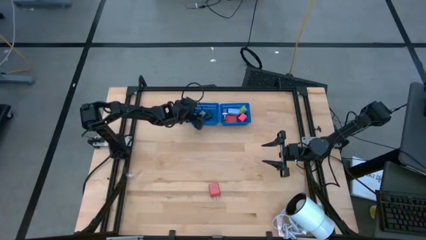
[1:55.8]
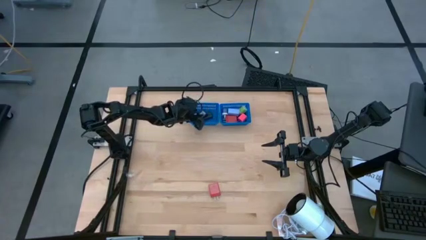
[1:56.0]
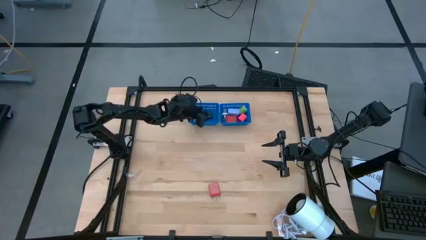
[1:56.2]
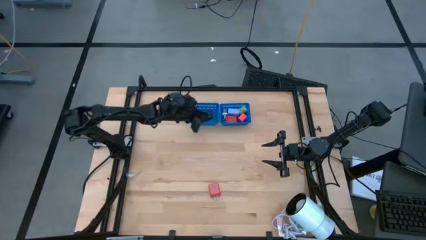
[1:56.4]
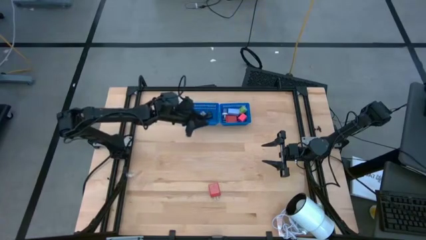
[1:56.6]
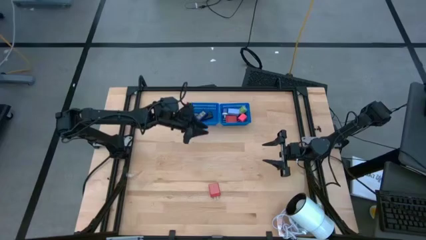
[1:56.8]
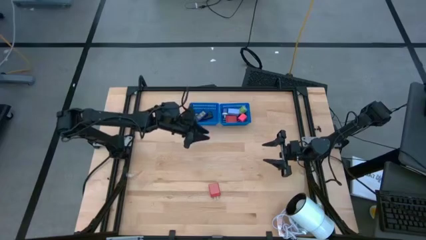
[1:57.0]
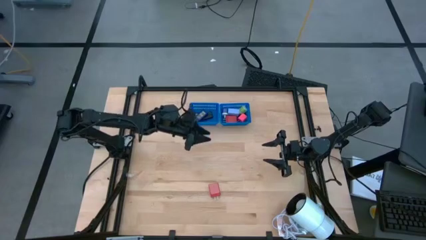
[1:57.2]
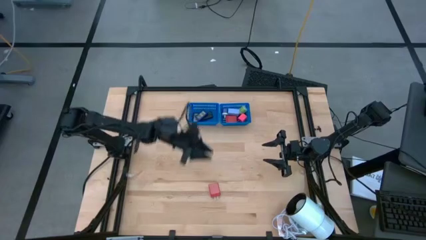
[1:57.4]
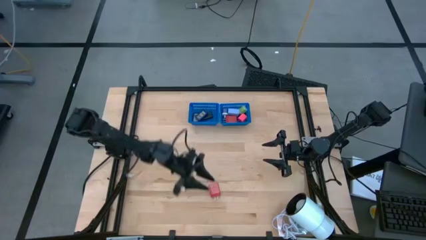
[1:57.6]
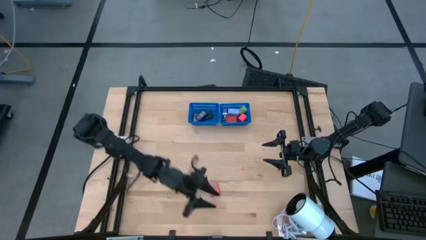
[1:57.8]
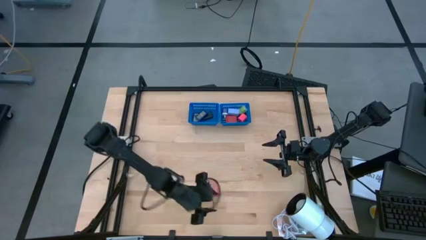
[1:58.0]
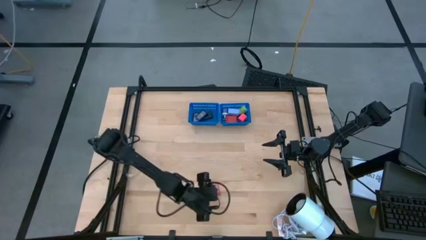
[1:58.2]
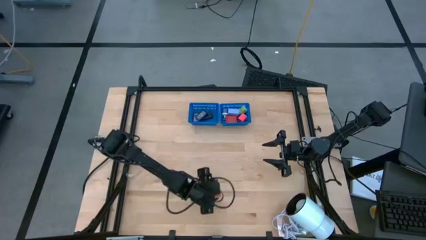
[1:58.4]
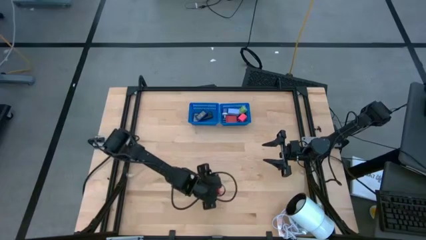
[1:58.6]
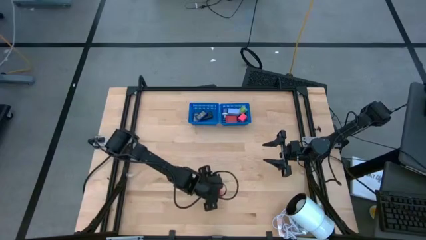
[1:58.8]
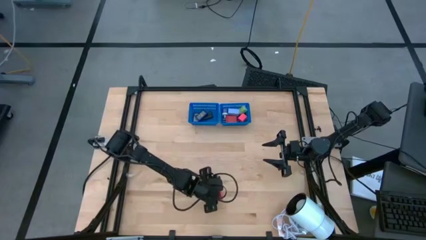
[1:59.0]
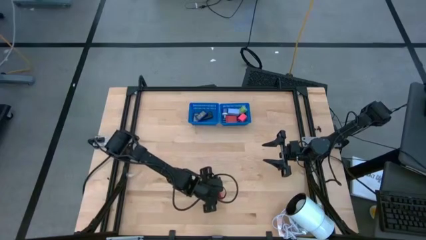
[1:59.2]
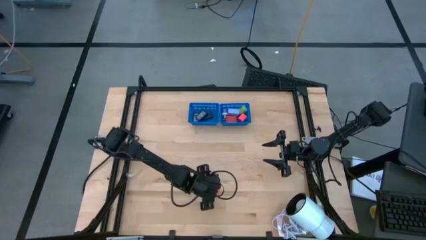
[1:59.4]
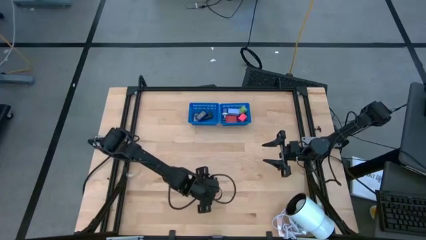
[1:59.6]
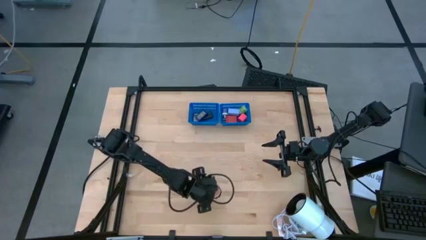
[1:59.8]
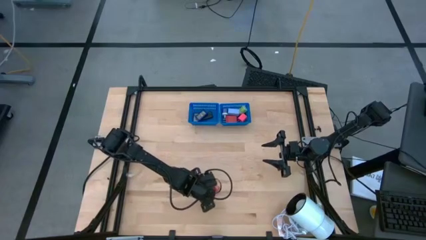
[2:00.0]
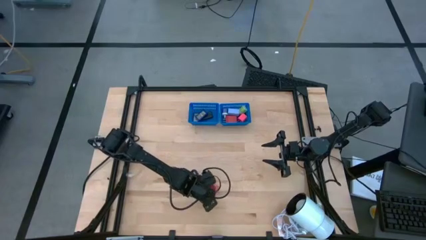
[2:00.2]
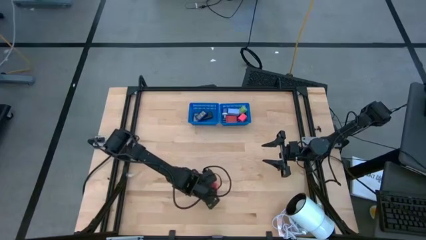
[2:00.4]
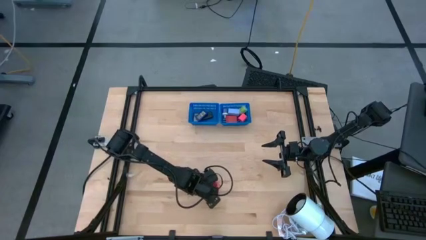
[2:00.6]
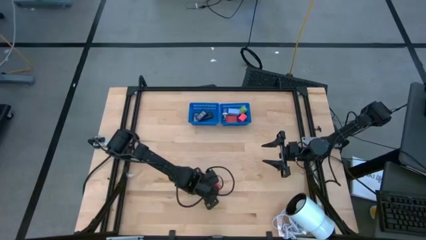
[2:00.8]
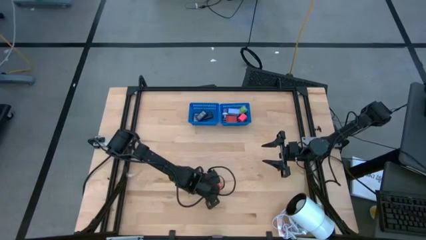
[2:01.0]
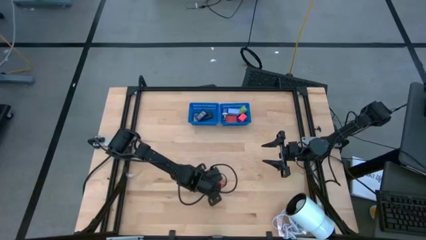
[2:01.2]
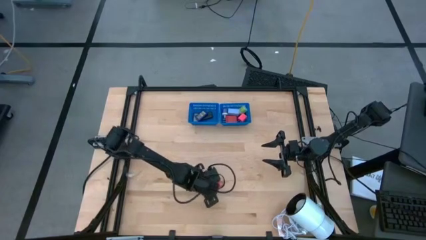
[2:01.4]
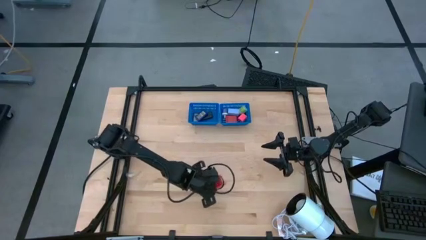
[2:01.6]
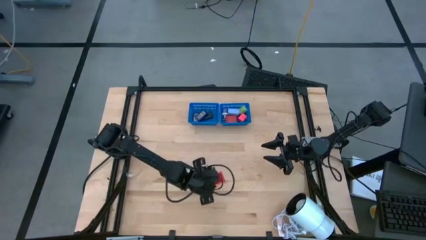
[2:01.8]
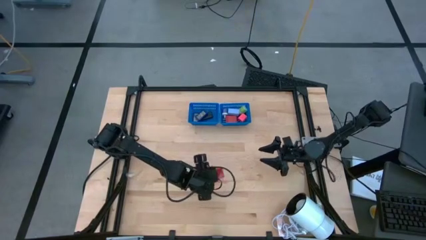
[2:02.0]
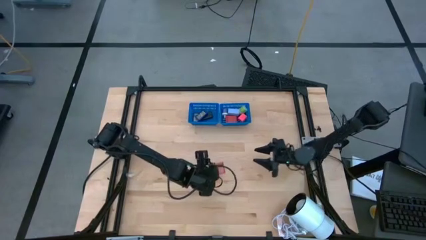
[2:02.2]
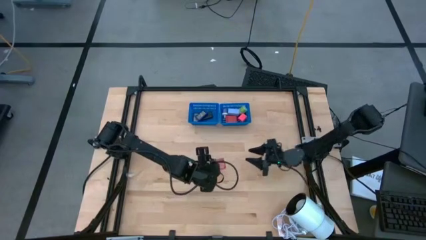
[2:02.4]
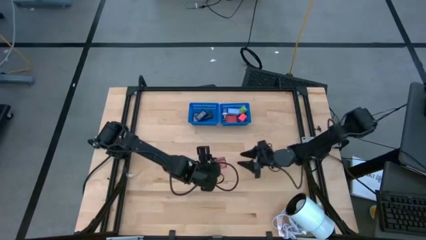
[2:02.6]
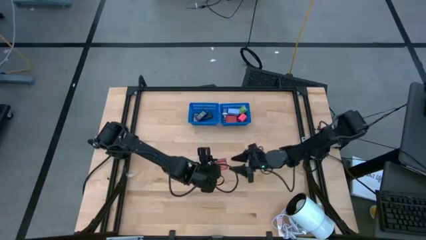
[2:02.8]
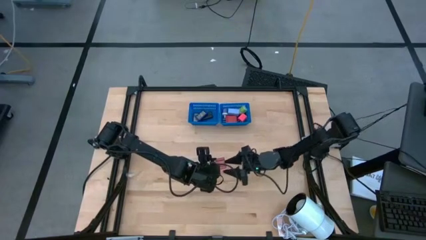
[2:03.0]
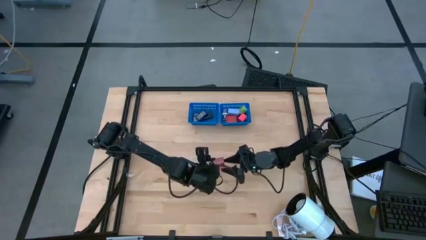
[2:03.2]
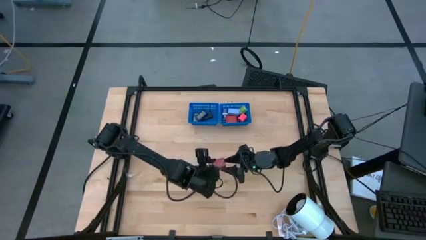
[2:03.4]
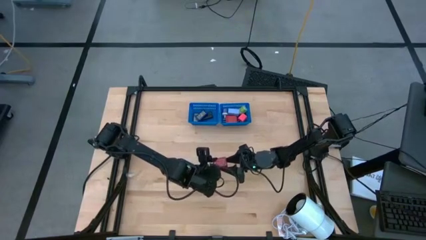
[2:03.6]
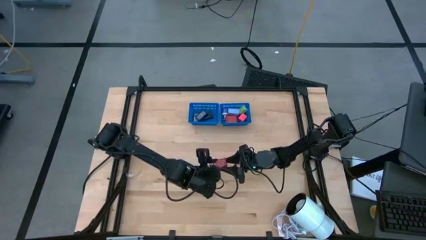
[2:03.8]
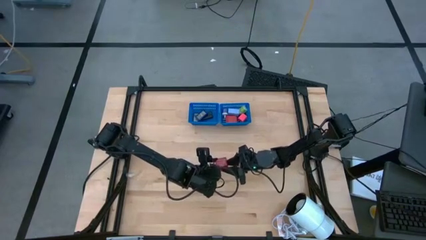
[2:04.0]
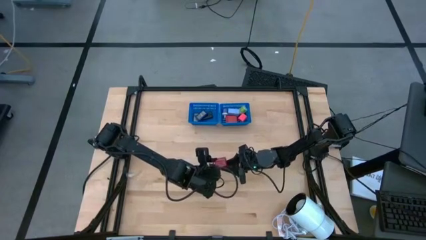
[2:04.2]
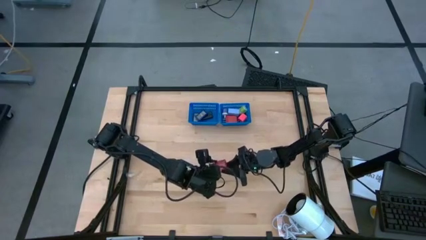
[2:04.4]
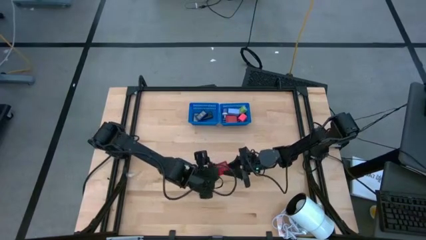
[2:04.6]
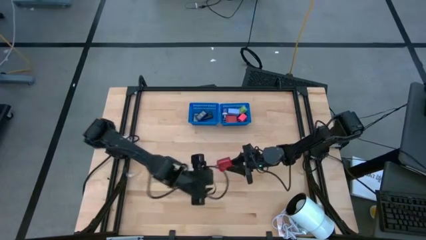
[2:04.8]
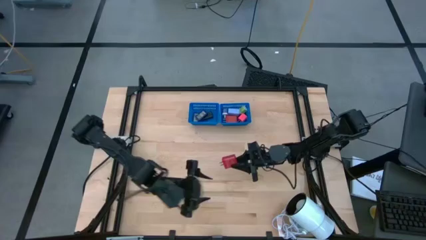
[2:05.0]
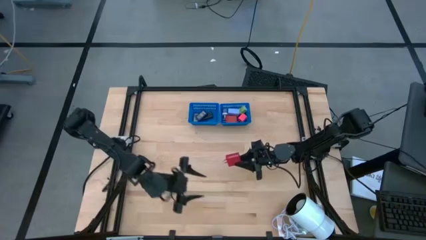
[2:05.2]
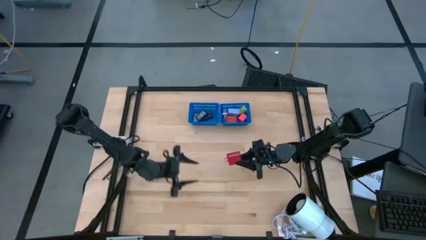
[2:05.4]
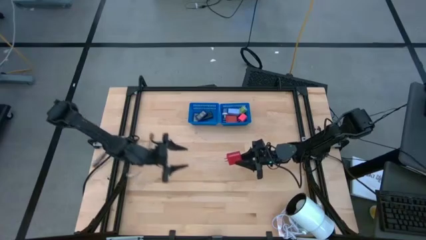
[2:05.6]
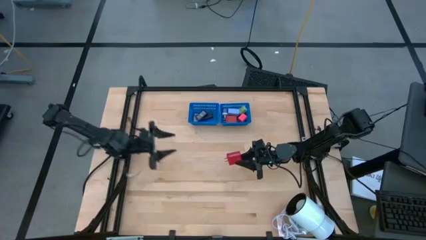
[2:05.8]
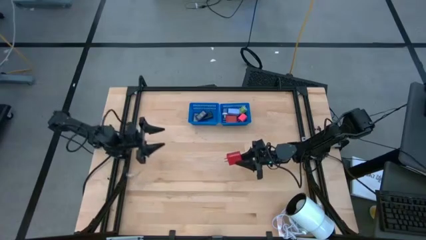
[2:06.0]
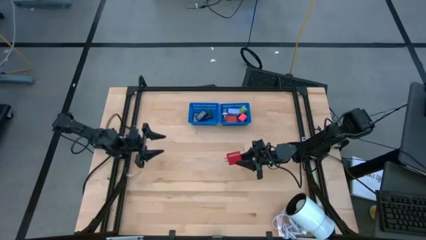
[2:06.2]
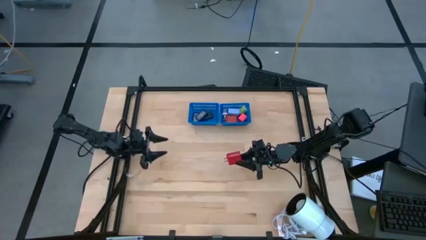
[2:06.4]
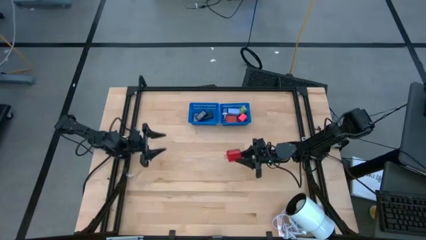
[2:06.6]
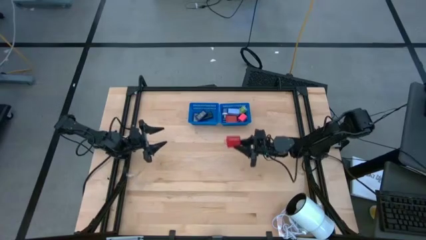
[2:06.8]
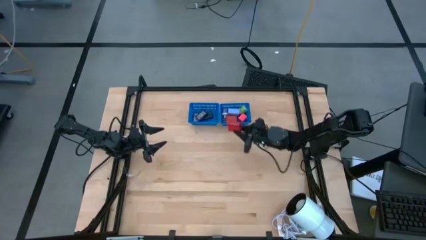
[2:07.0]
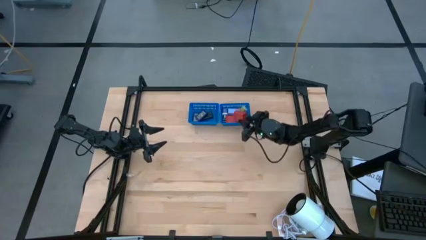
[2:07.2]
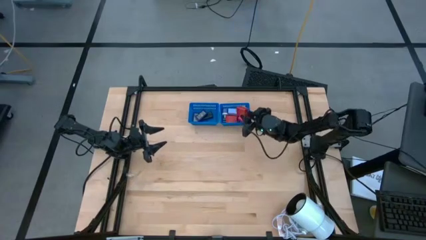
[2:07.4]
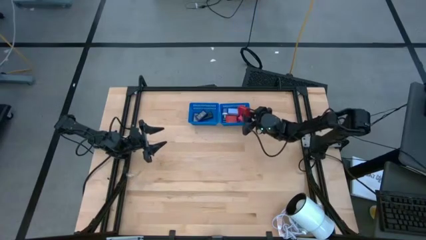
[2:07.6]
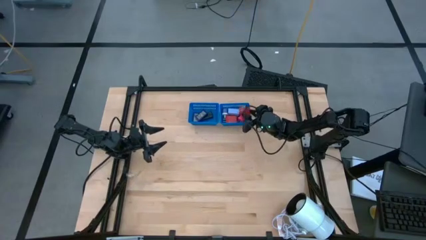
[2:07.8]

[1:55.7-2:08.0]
Task: Pick & Place Office items
Put the red charger adapter into the right blue bin

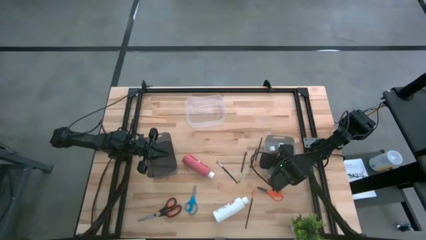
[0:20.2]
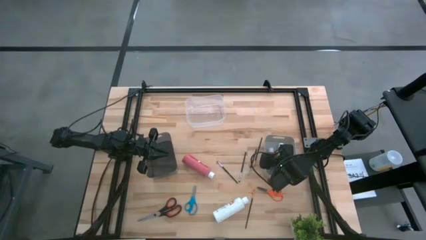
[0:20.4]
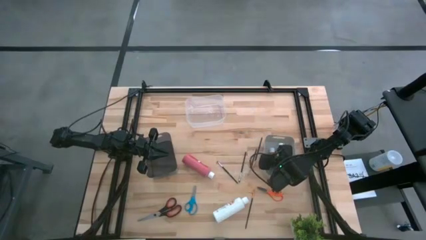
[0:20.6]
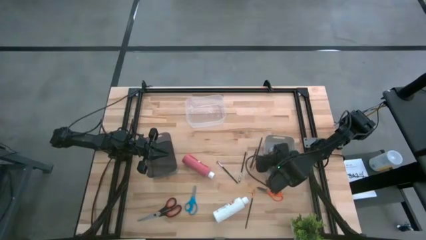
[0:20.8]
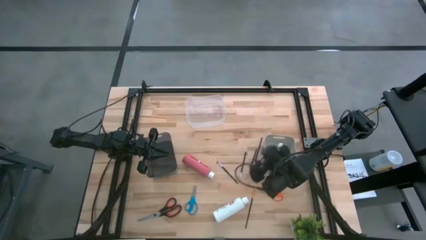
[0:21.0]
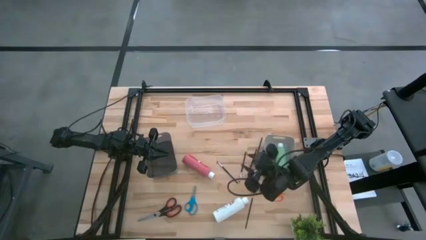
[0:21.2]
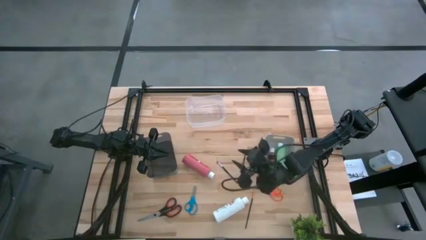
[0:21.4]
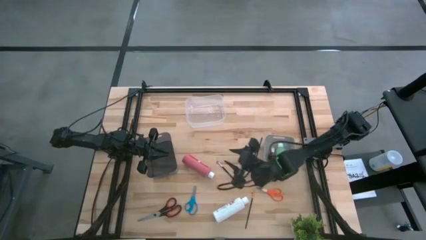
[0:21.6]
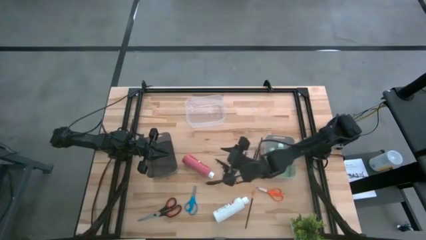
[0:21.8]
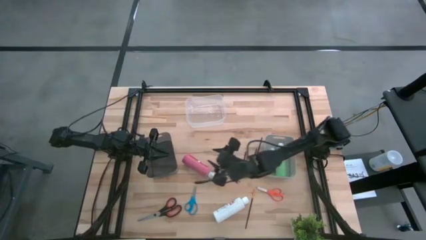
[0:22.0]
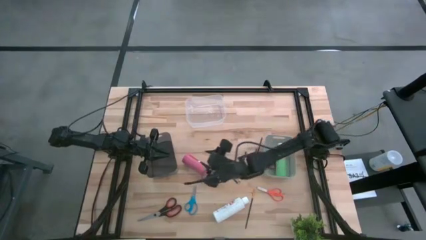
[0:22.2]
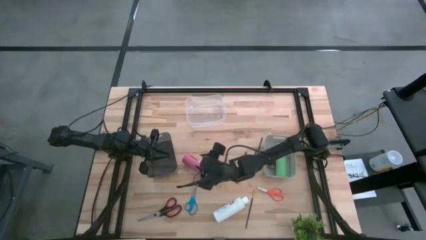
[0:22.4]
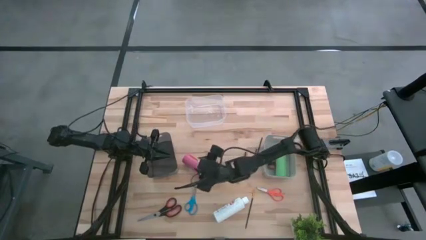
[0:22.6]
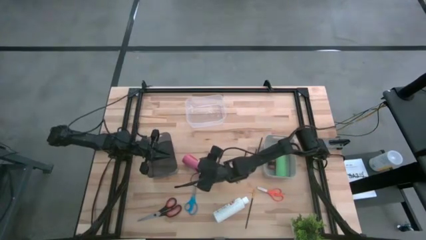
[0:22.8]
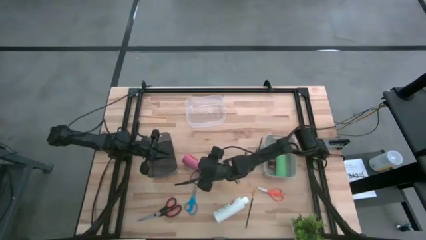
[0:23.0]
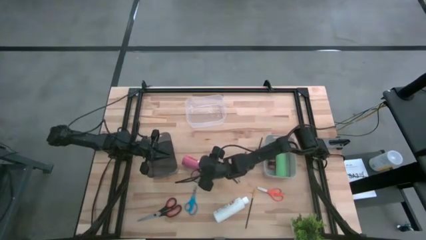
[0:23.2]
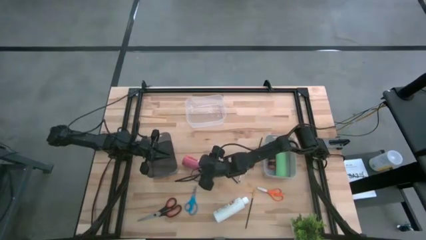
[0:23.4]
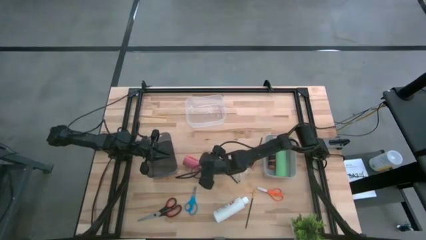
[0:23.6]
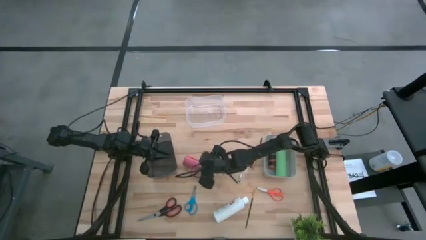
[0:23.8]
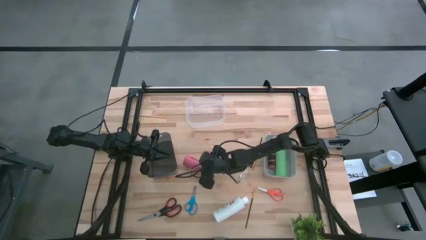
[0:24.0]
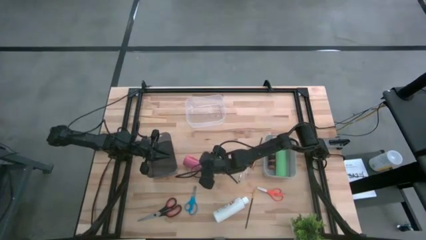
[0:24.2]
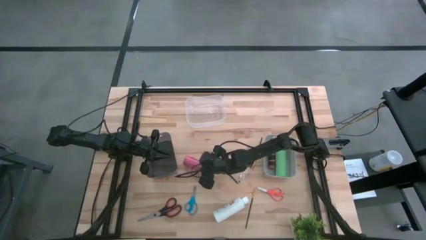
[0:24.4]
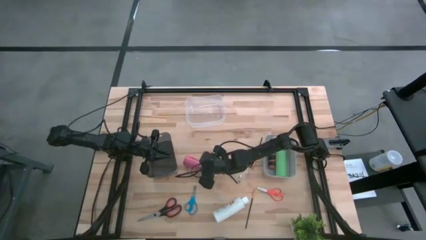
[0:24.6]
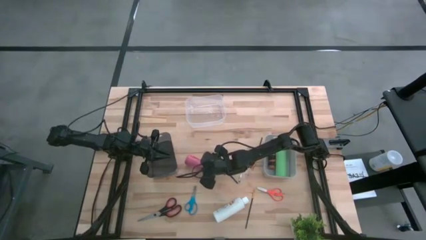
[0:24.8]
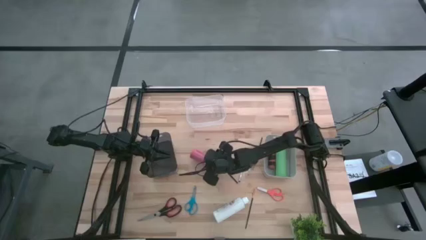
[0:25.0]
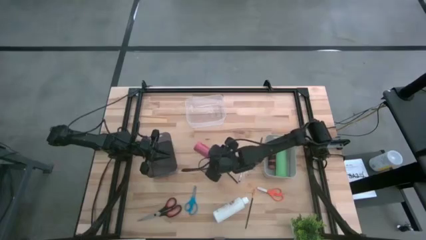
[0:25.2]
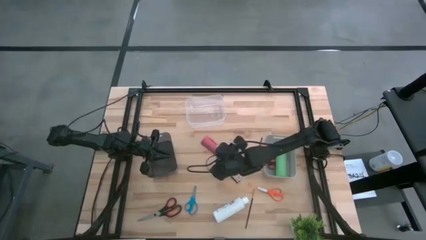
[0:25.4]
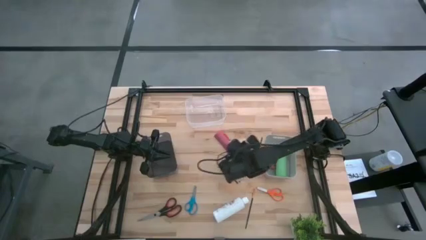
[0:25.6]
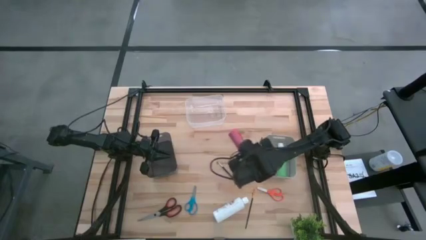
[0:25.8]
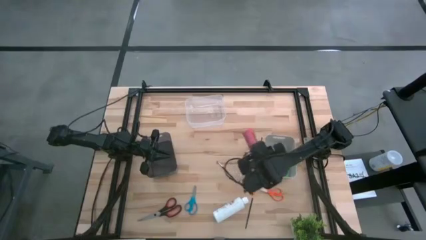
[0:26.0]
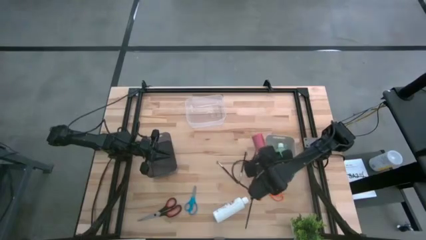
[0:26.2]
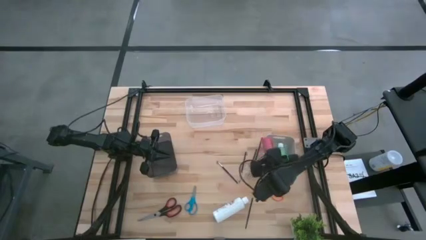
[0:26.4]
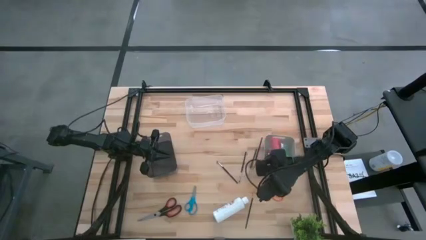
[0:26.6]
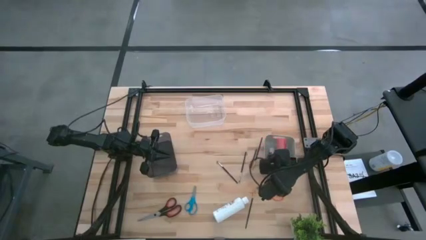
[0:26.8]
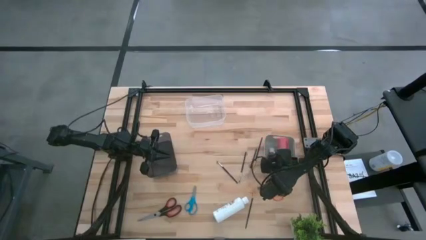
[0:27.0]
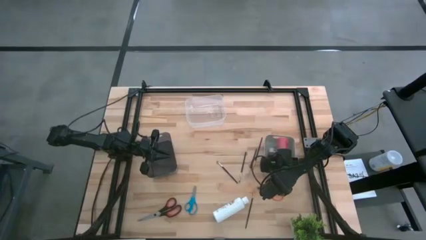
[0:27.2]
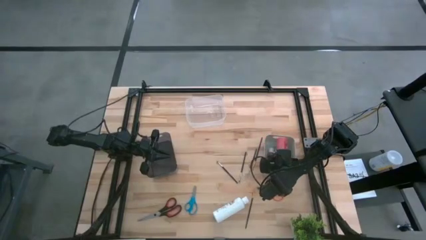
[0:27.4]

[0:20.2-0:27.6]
Task: Pick & Place Paint Supplies
Put the pink paint bottle into the gray bin
